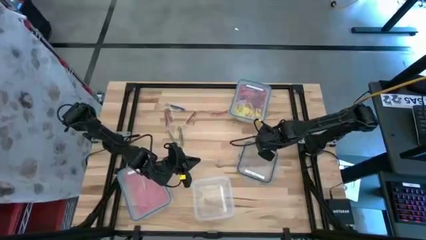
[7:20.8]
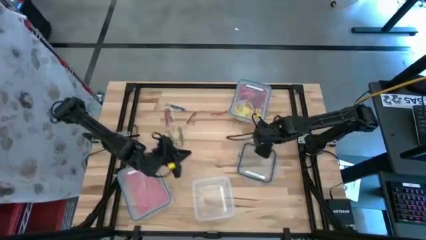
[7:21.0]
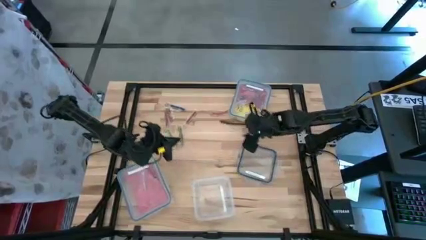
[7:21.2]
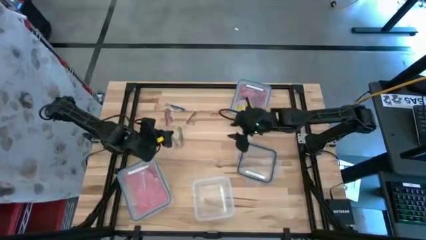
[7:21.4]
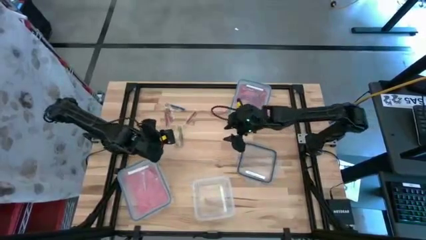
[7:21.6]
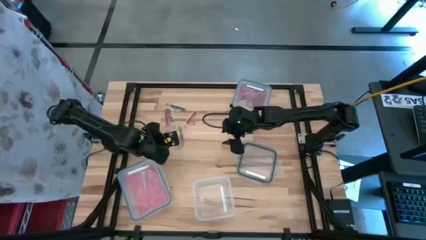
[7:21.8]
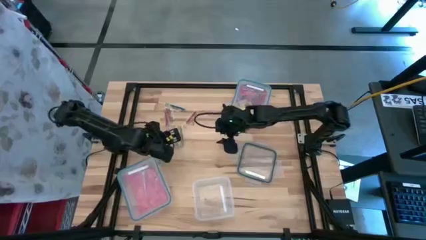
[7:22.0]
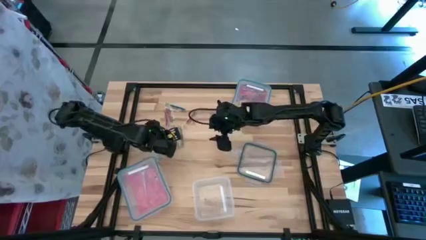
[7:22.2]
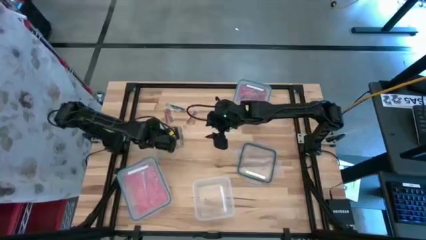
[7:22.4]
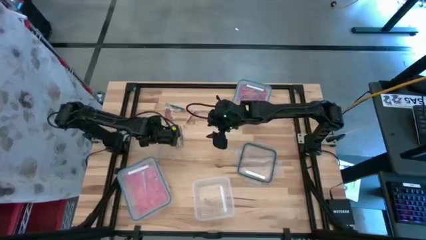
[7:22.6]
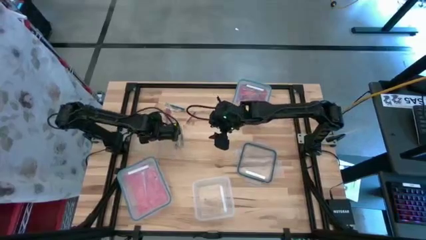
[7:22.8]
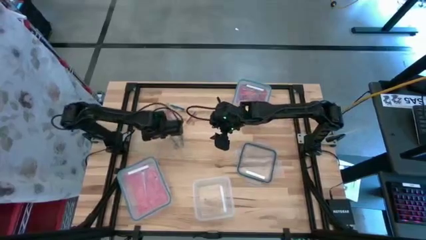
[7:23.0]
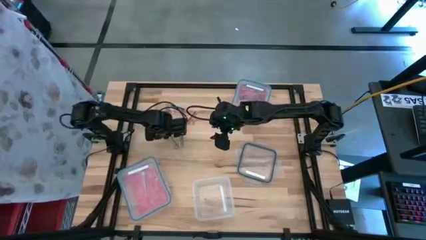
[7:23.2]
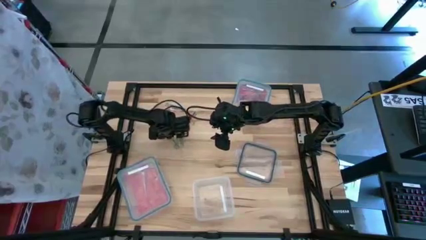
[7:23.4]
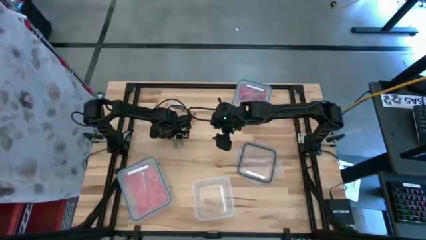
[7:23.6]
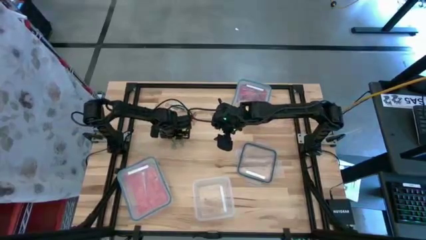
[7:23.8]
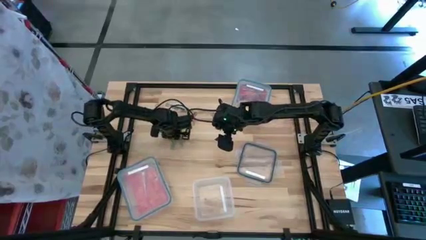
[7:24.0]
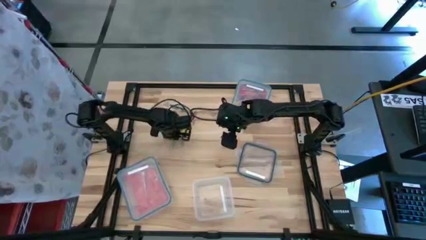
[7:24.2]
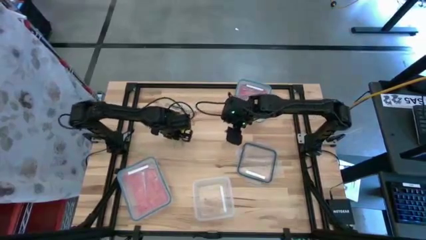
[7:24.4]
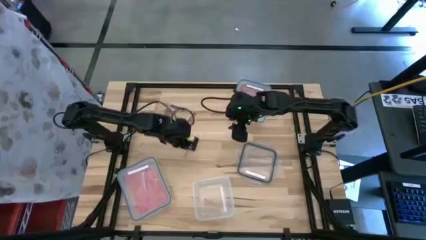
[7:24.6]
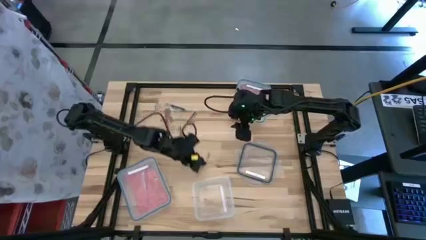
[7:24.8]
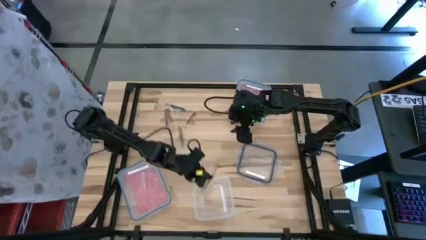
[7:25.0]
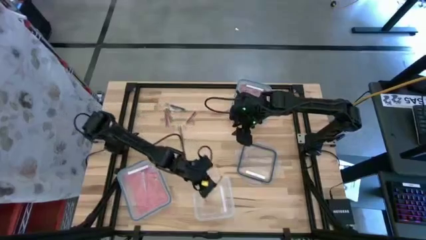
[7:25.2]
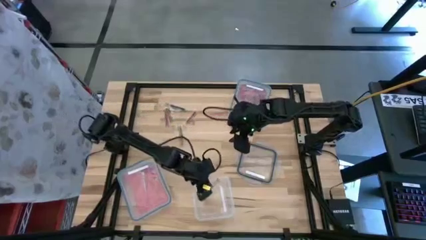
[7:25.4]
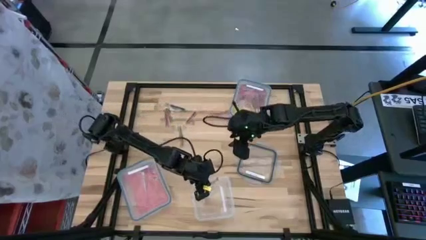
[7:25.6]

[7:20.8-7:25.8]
Task: Sort candy
Put the green candy stick into the square transparent bin

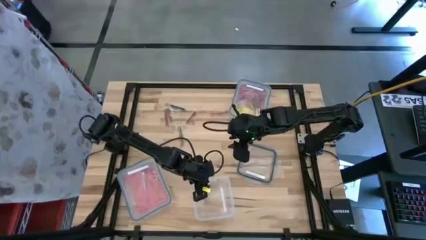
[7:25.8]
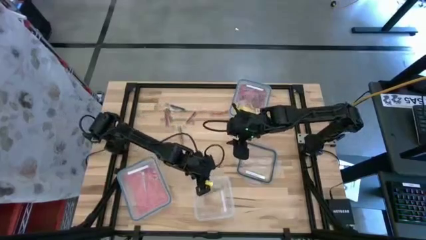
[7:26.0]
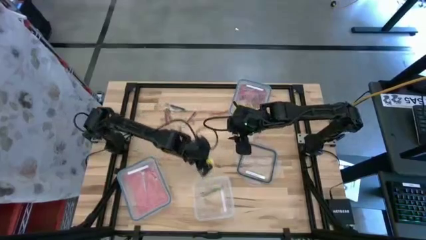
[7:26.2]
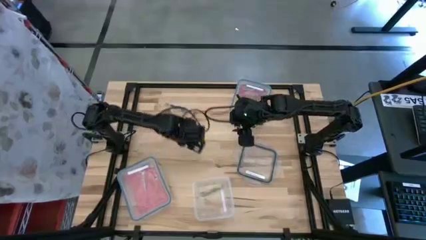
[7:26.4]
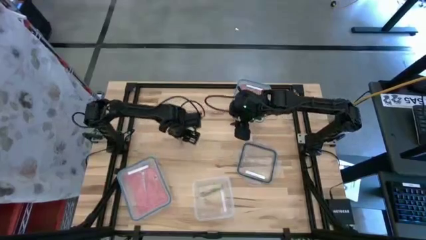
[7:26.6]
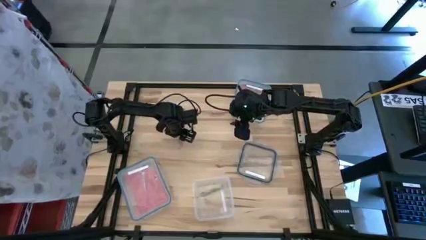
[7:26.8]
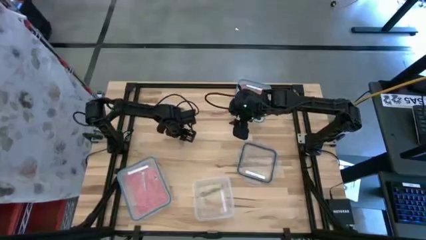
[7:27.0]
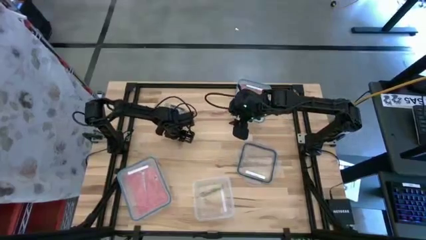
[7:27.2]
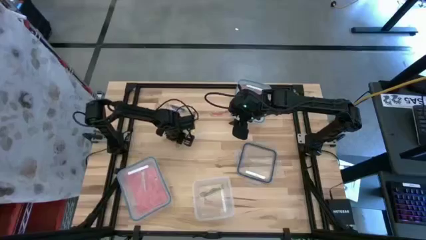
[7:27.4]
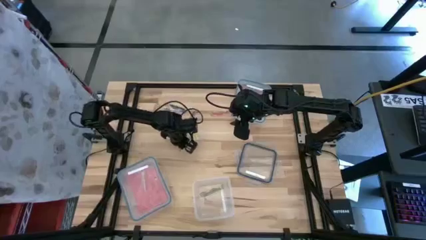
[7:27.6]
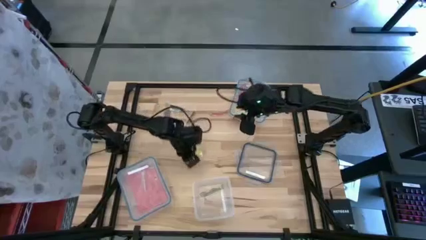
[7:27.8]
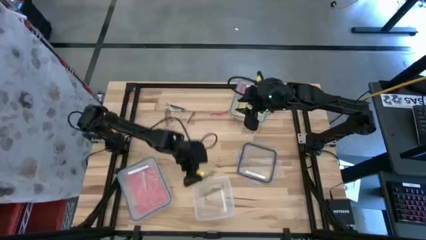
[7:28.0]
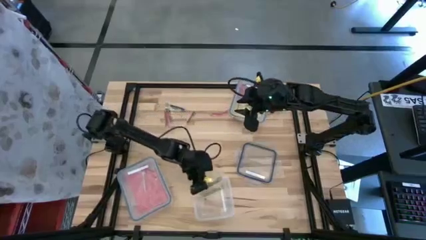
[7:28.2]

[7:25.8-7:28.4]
Put the green candy stick into the square transparent bin

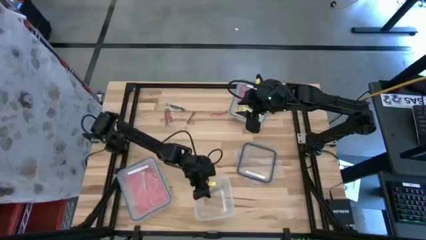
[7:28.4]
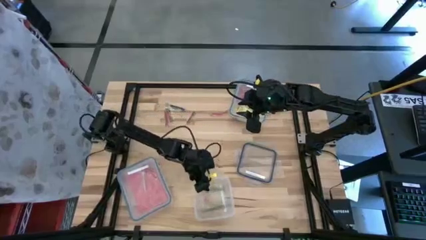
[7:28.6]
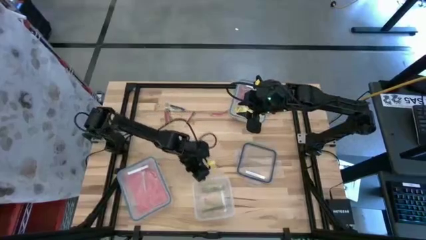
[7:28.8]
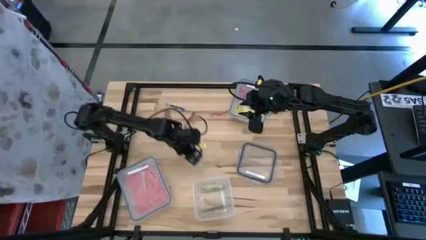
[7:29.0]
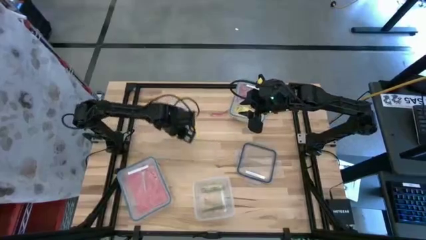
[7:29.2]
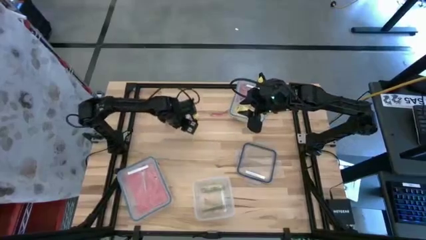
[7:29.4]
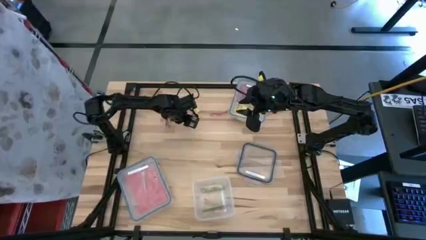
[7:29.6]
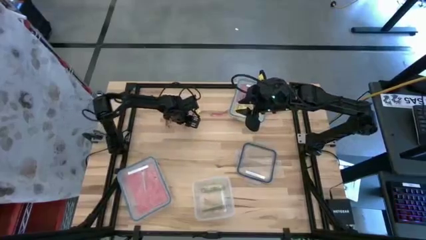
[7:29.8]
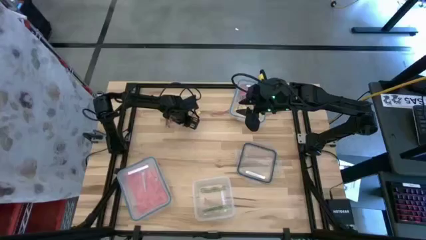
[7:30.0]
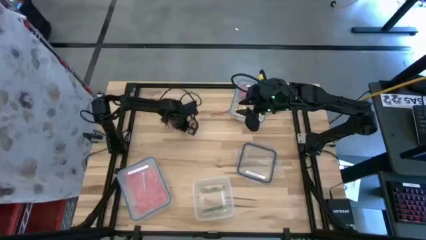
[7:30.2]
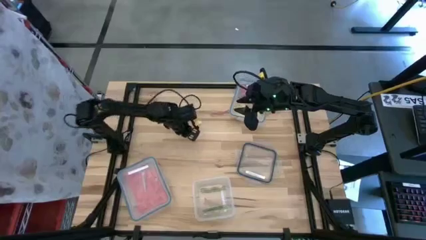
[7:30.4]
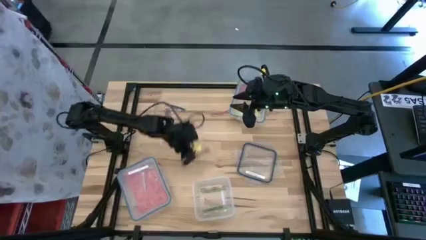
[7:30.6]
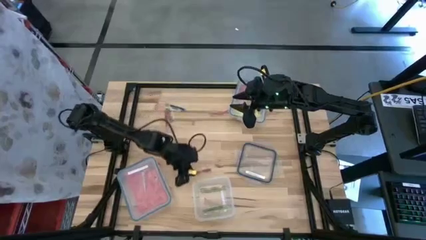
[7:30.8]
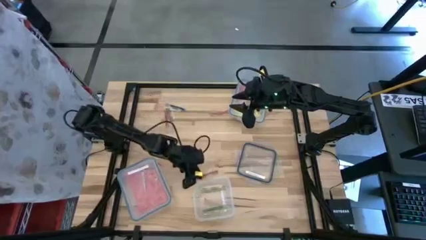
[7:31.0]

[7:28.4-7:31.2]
Put the red candy stick into the square transparent bin

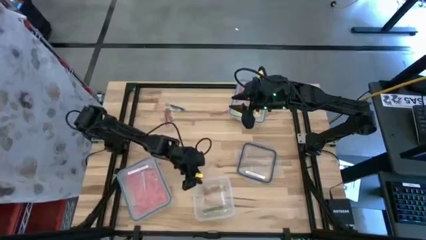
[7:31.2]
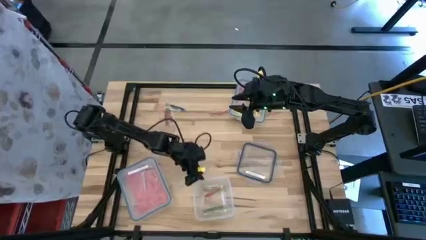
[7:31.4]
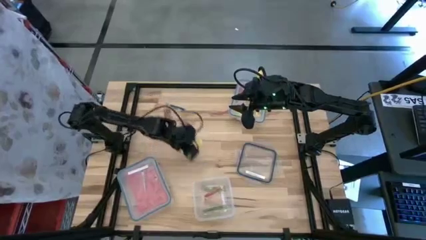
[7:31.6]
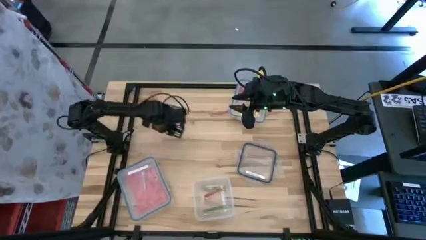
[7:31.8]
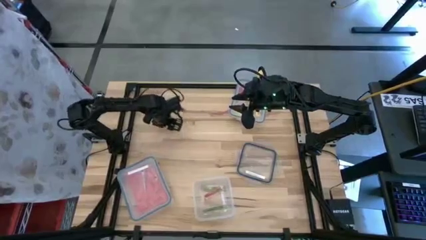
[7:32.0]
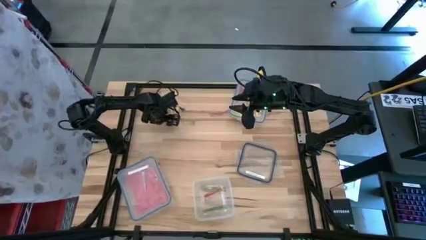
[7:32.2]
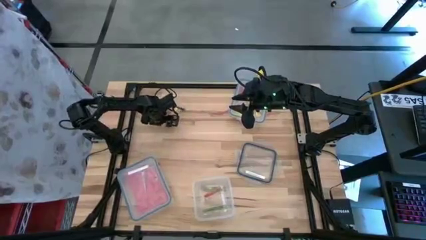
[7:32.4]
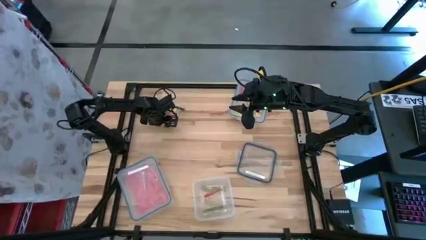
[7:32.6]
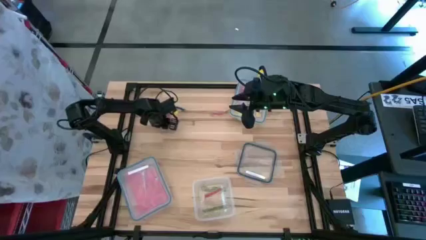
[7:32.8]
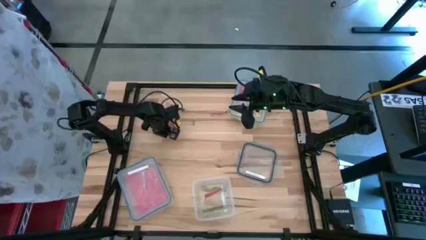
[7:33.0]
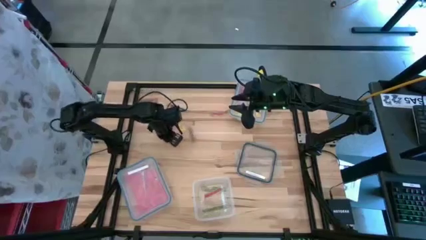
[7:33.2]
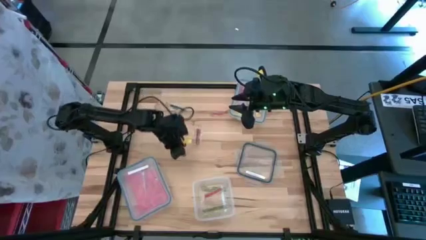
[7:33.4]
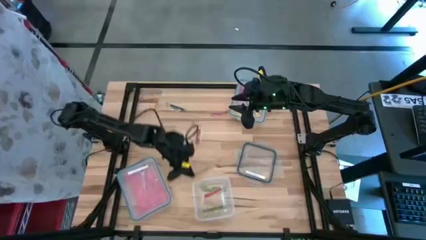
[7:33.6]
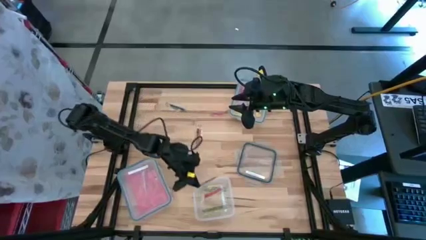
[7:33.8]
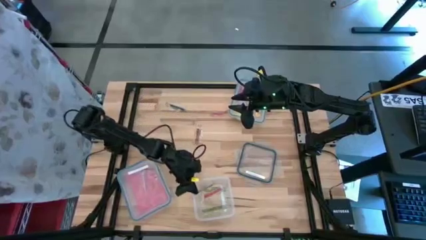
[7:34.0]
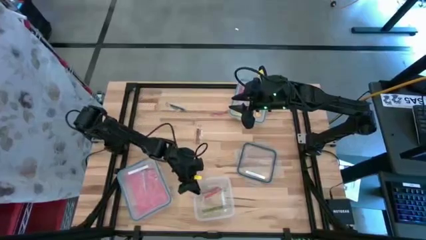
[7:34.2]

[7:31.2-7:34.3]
Put the red candy stick into the square transparent bin

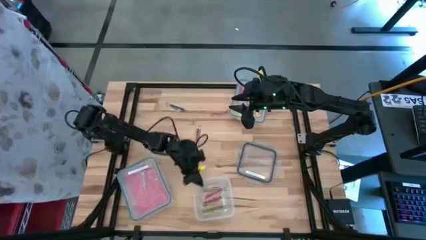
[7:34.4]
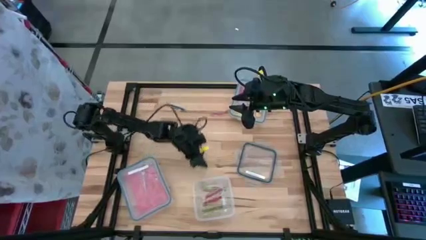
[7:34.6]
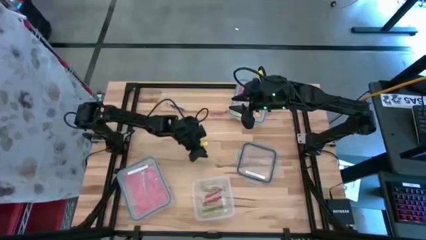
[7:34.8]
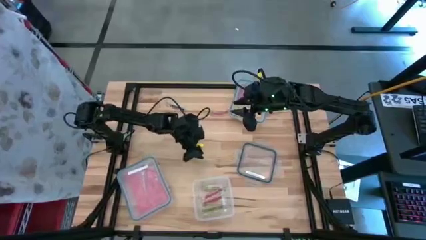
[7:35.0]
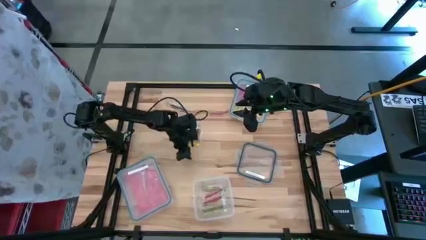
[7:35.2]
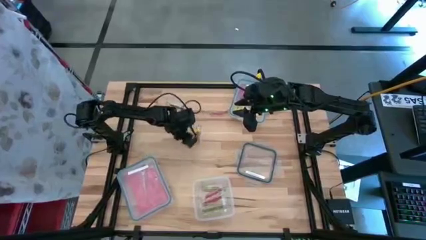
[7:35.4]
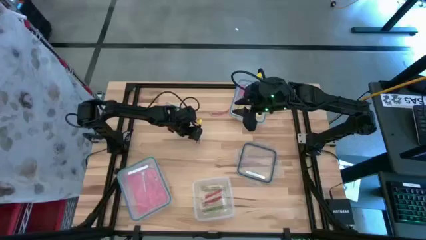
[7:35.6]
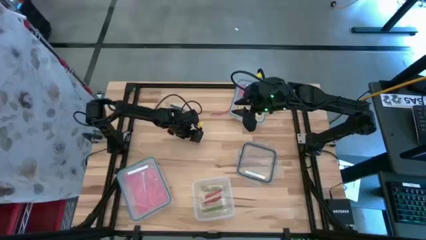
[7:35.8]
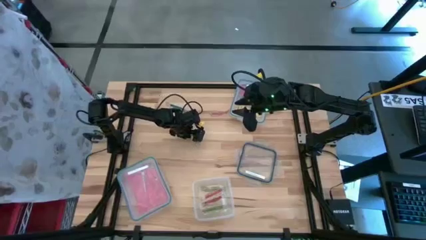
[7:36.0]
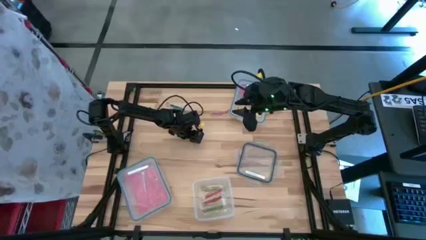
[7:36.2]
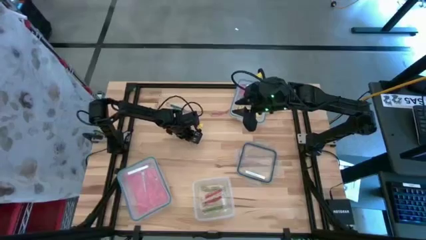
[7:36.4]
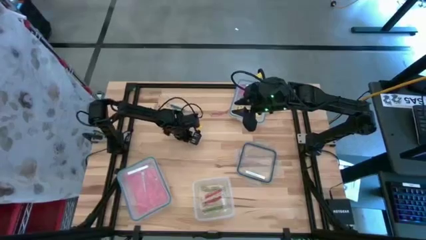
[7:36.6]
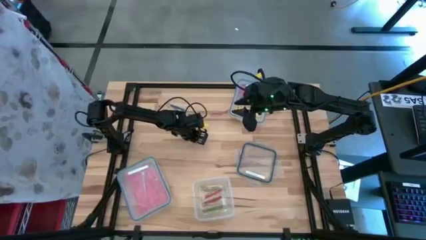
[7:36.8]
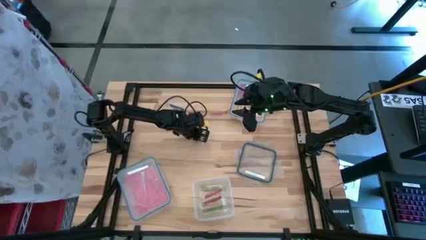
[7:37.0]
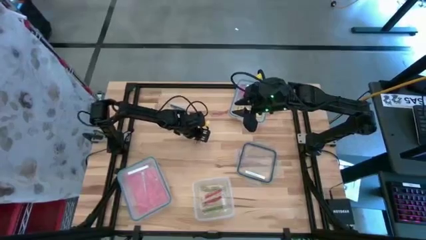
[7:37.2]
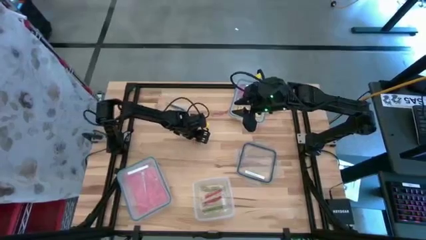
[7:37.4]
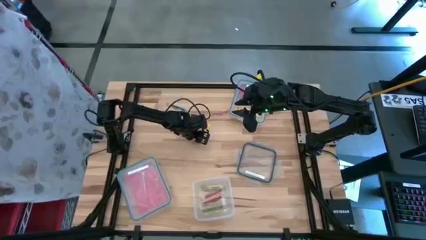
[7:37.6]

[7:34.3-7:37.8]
Put the red candy stick into the square transparent bin

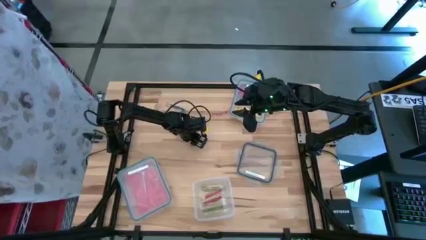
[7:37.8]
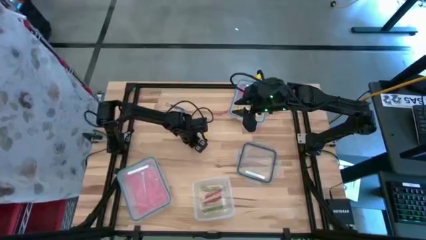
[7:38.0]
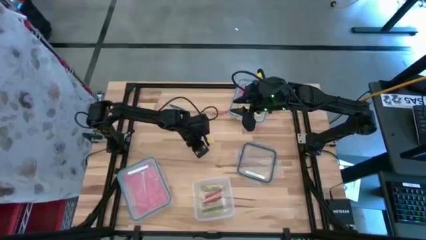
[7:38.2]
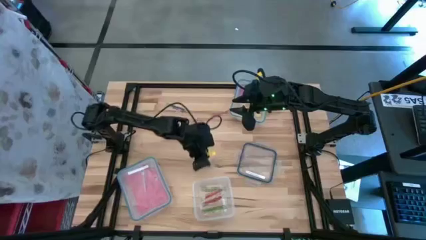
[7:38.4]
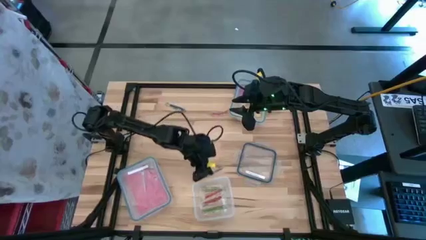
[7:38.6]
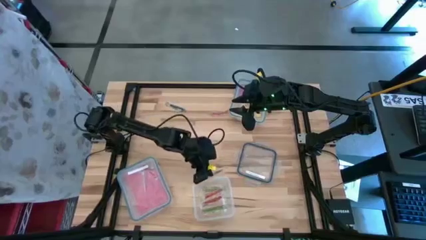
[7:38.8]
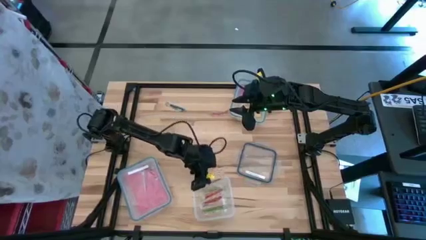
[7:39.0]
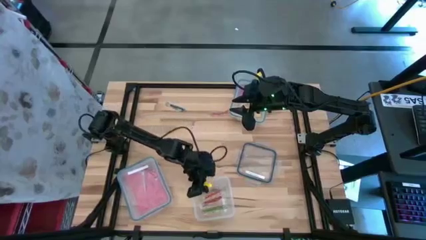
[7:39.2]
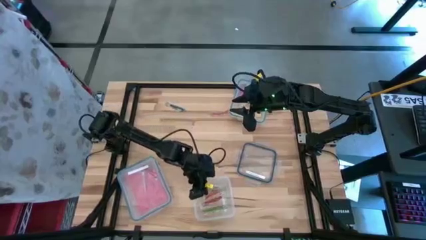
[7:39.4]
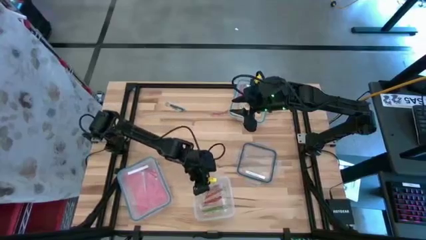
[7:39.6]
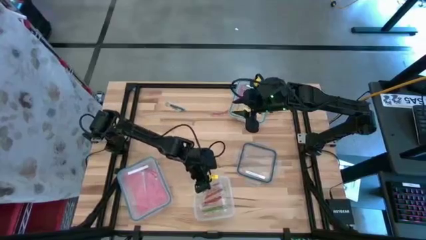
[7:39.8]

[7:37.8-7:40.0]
Put the red candy stick into the square transparent bin
